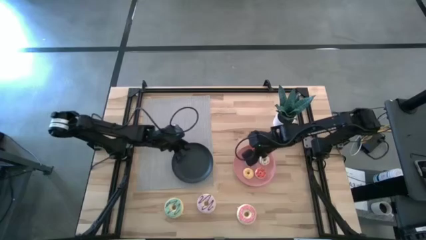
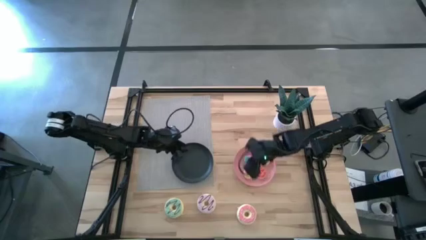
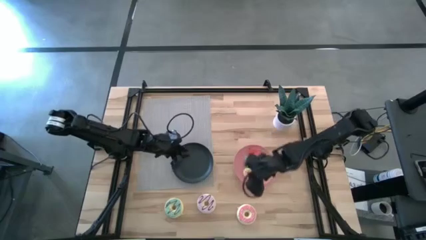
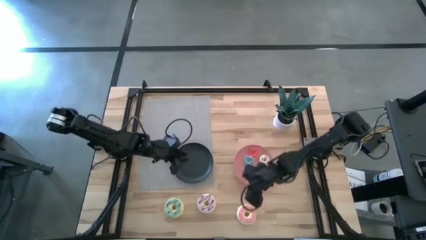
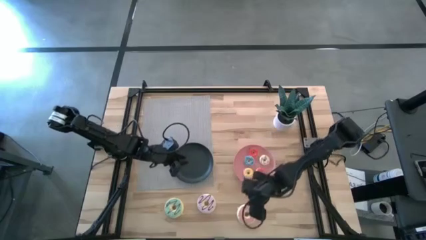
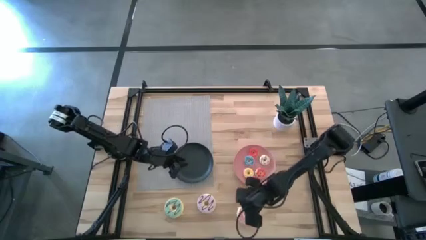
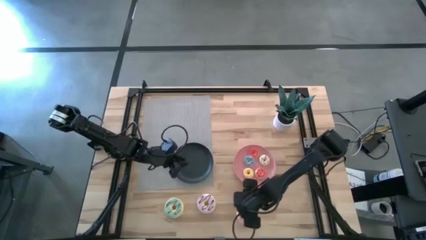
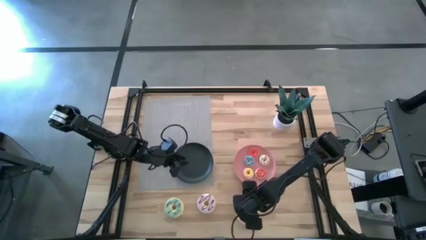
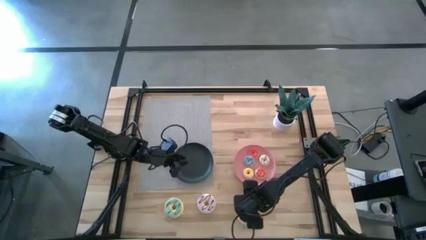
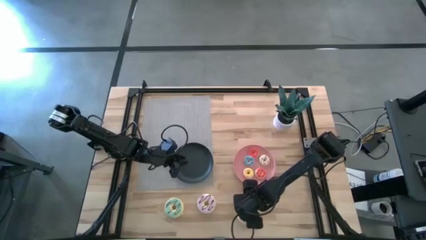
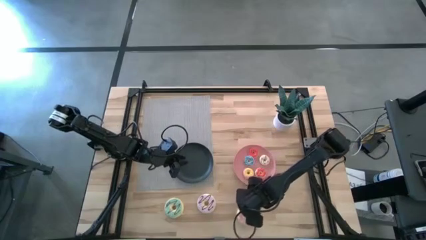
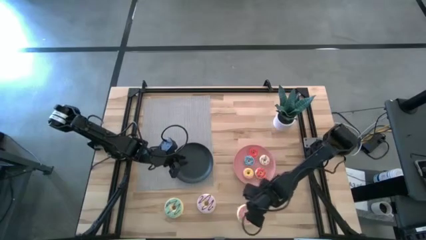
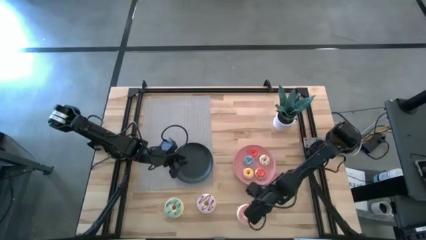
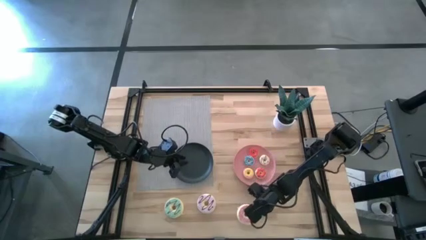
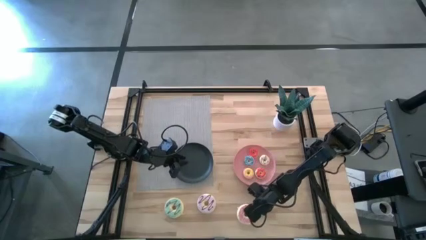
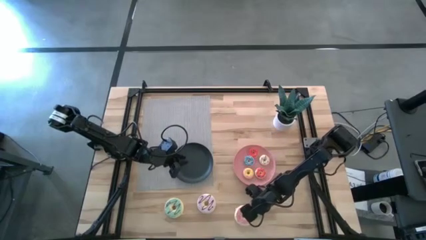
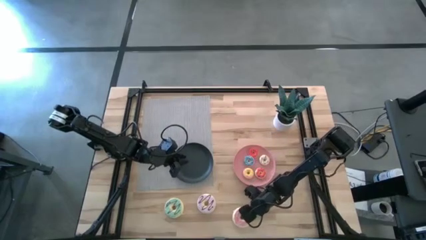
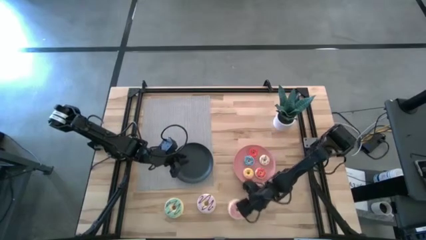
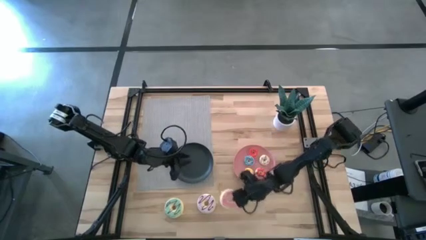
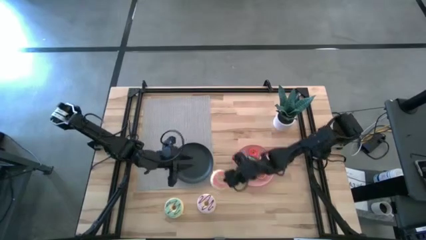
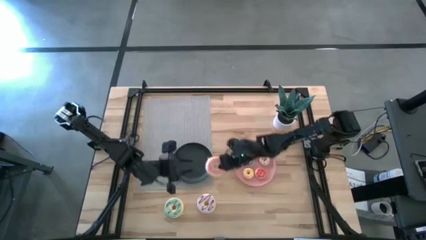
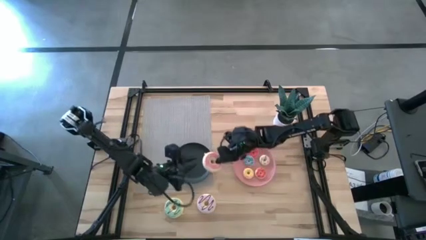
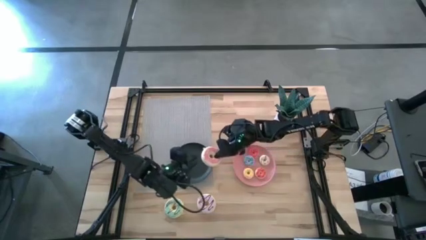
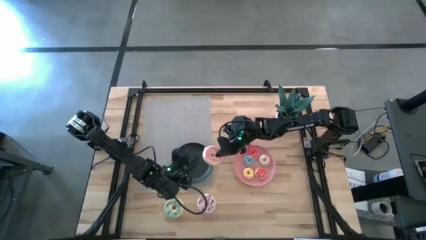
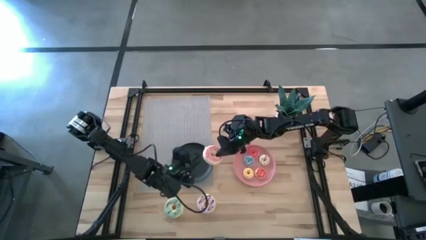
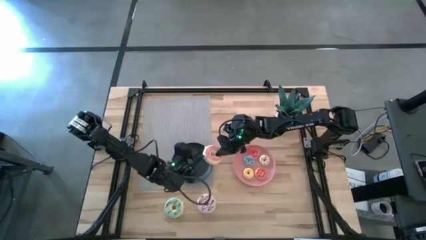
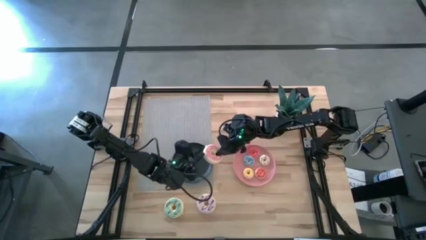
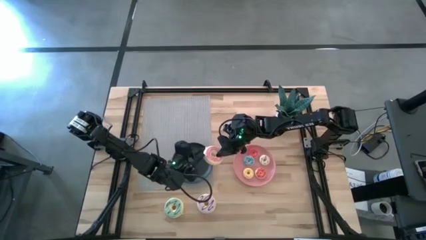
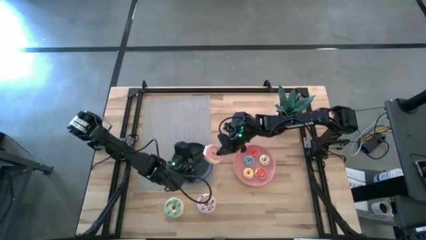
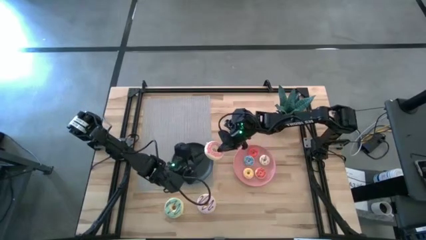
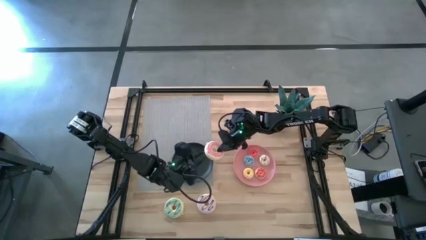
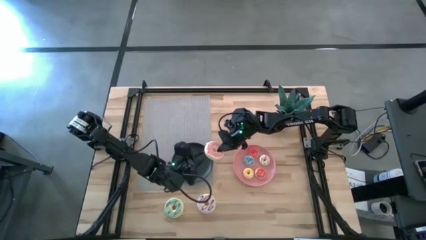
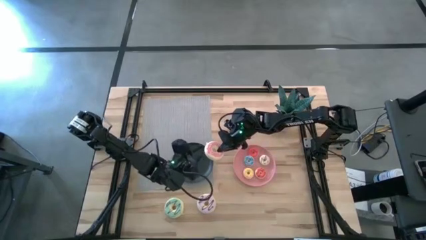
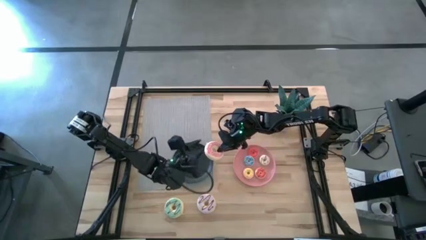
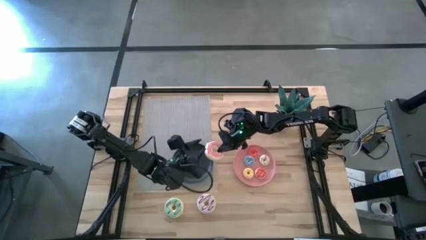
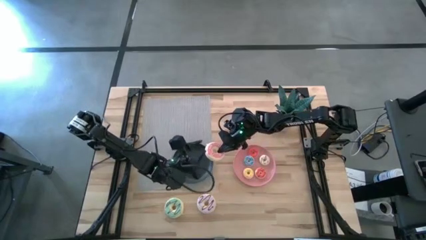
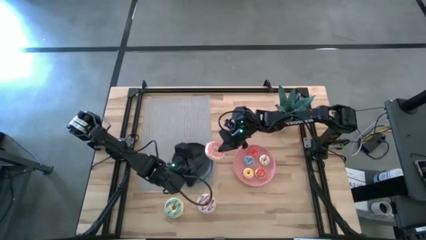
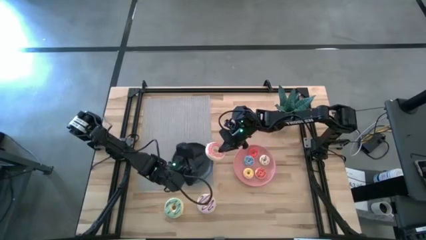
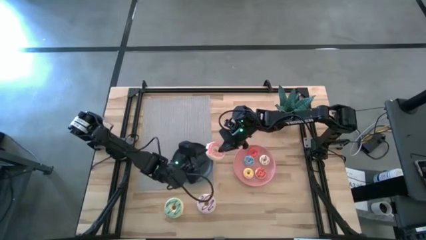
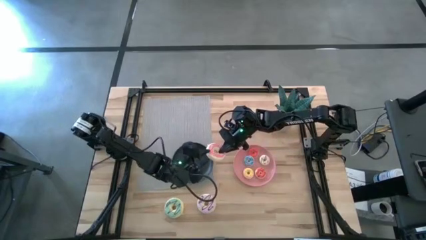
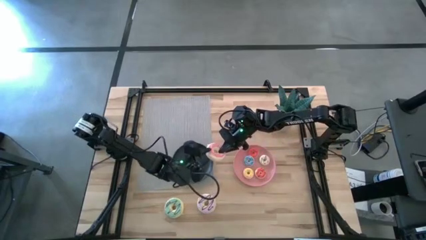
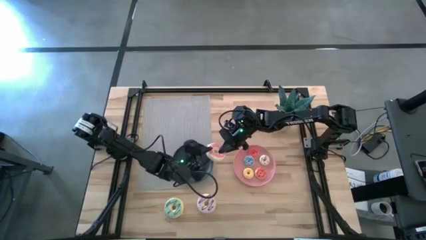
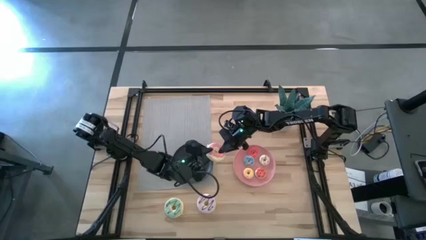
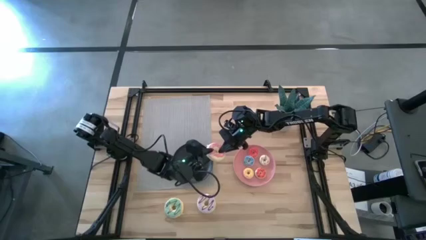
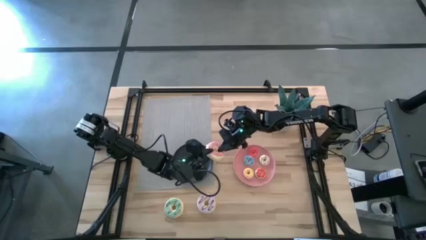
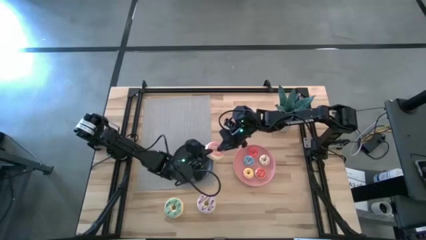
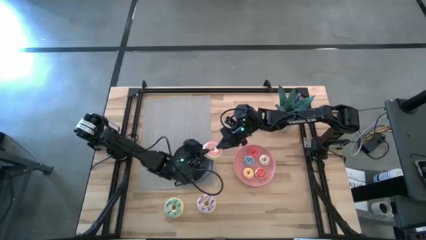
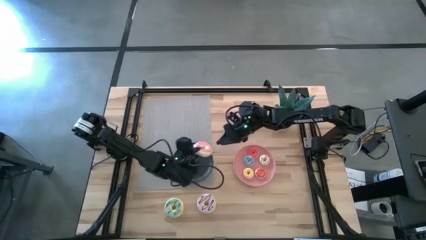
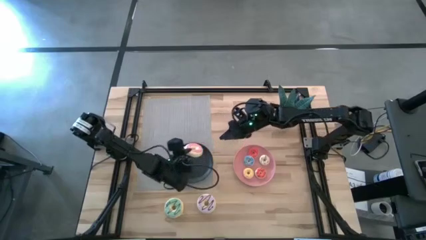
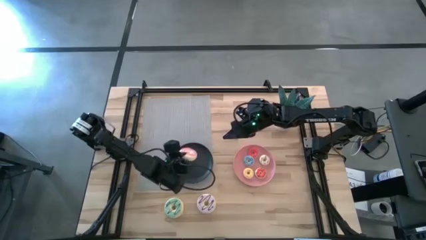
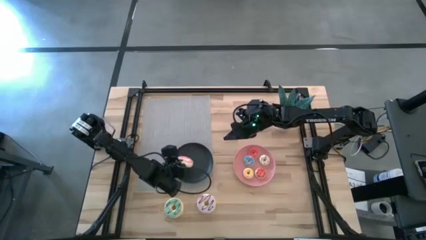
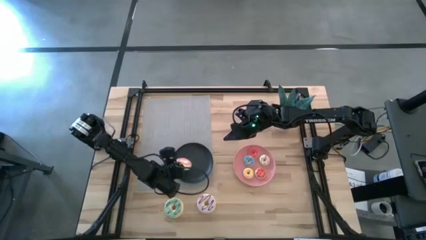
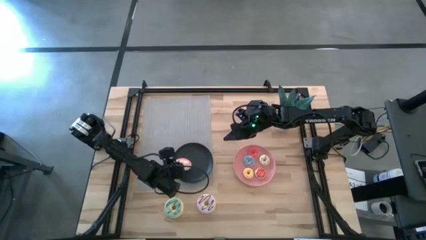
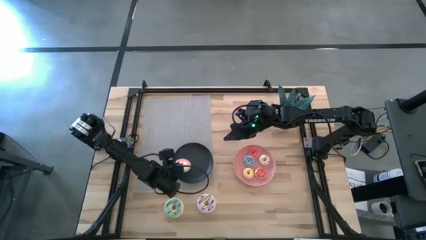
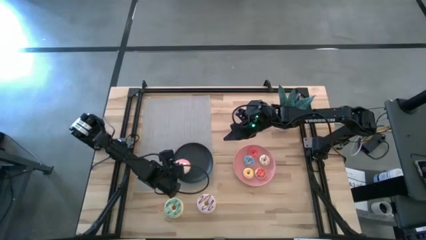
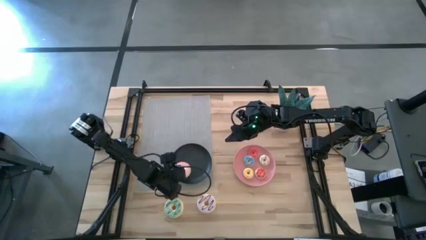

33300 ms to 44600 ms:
Task: Pick & Place donuts
Put the large pink donut onto the black plate

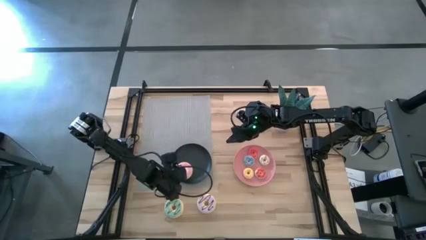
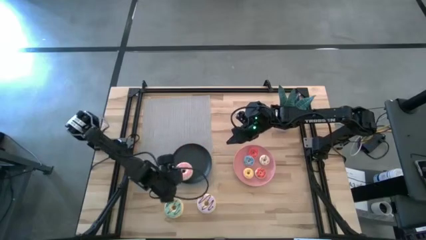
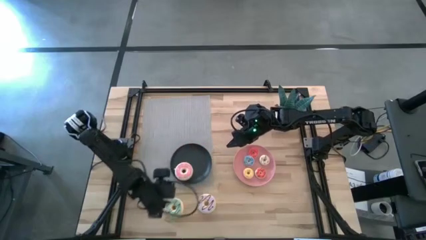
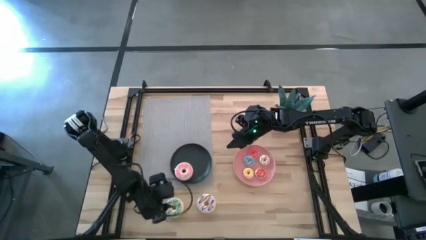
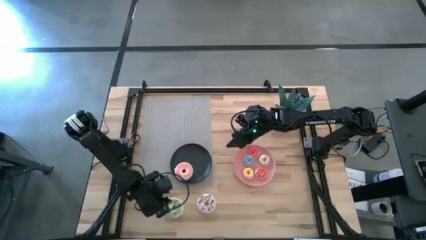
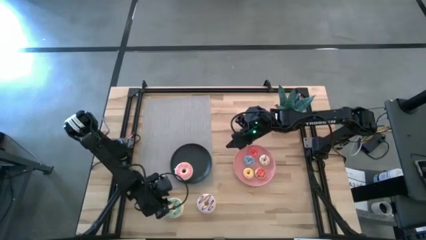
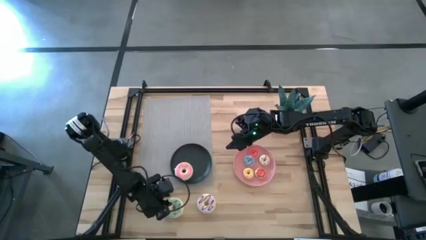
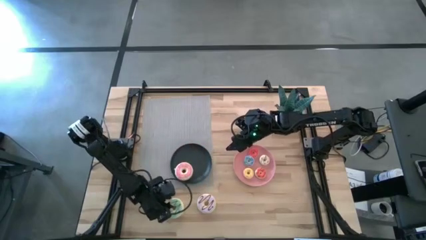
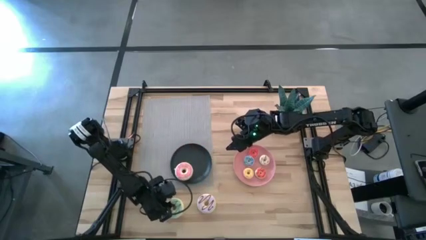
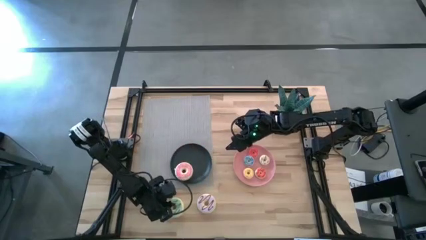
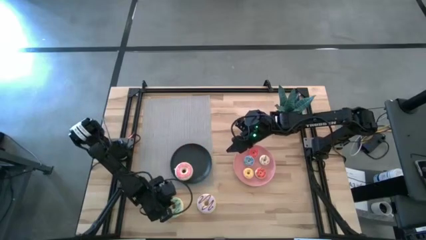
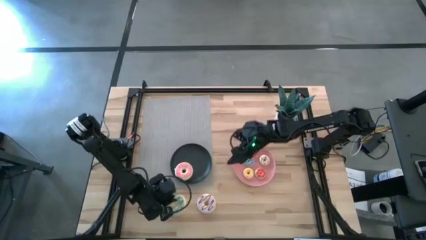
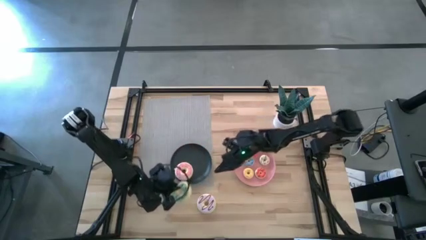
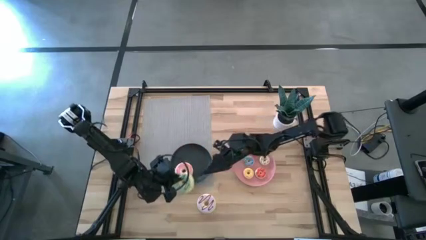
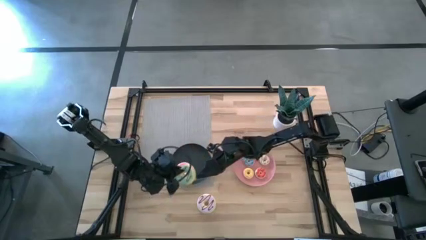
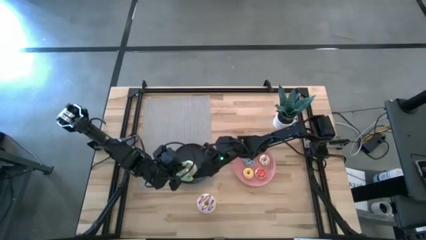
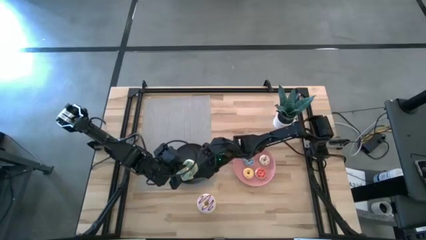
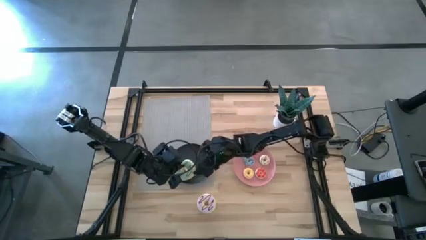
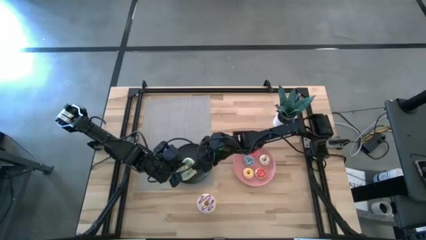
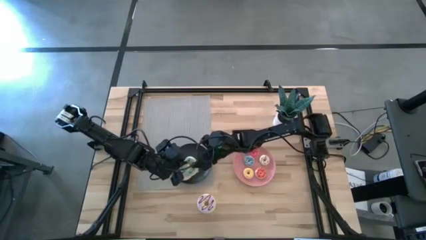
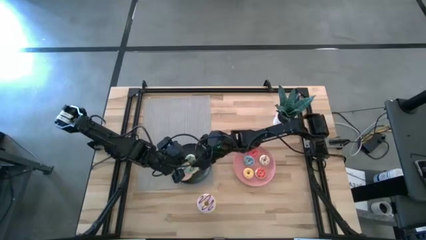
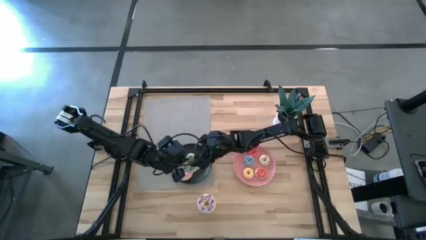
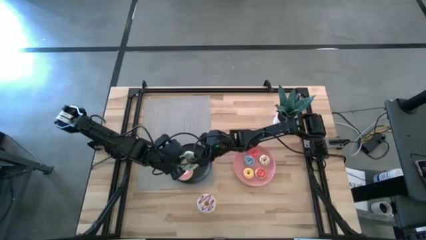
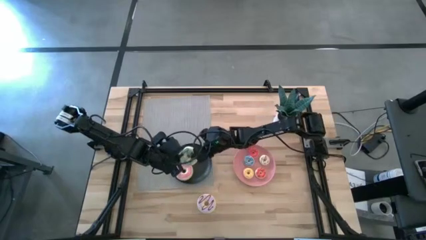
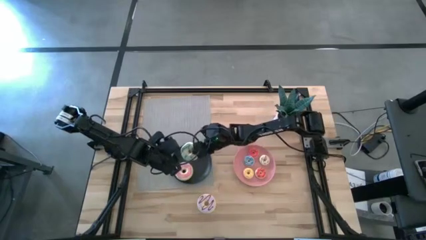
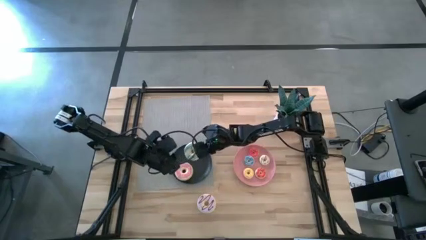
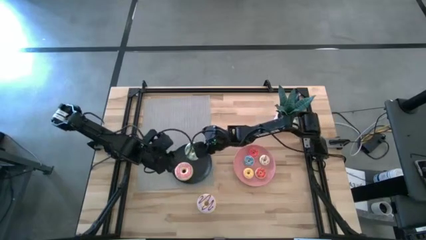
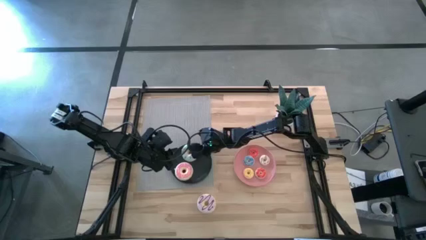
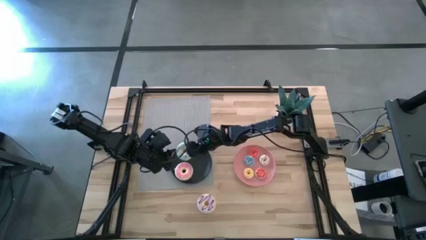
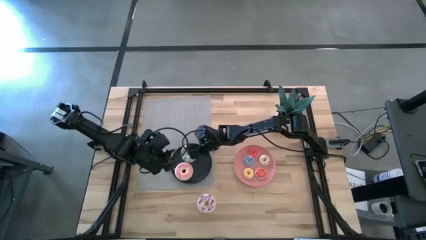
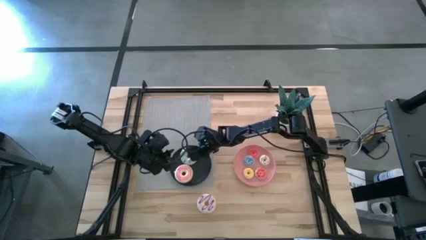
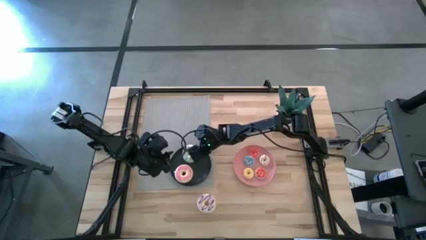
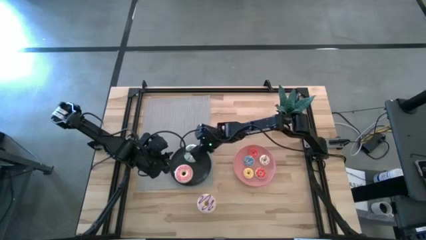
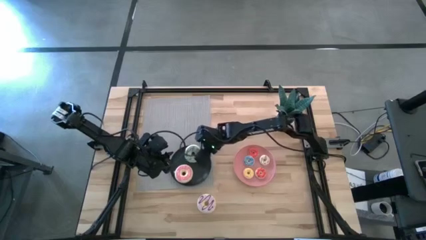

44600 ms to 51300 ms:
Put the large green donut onto the black plate
